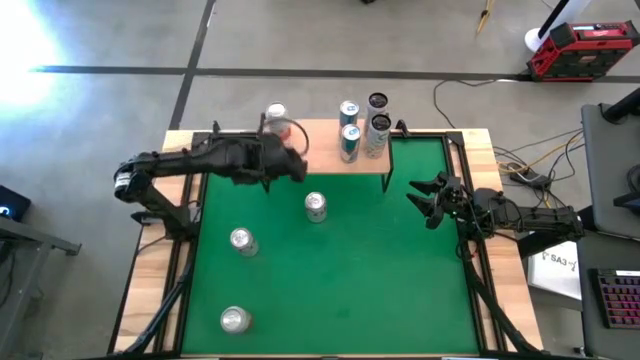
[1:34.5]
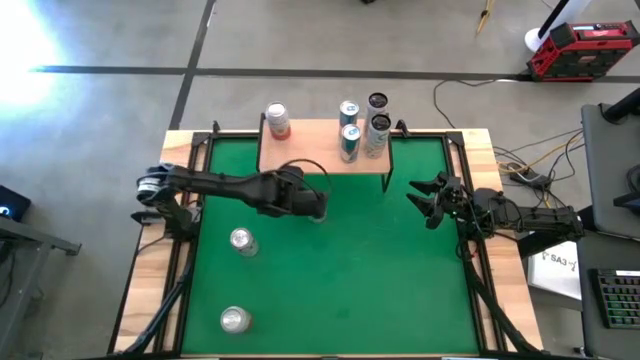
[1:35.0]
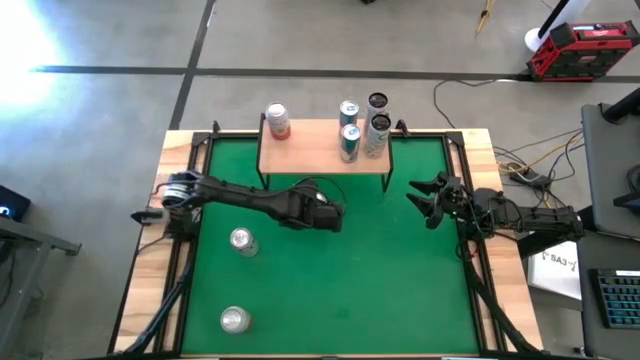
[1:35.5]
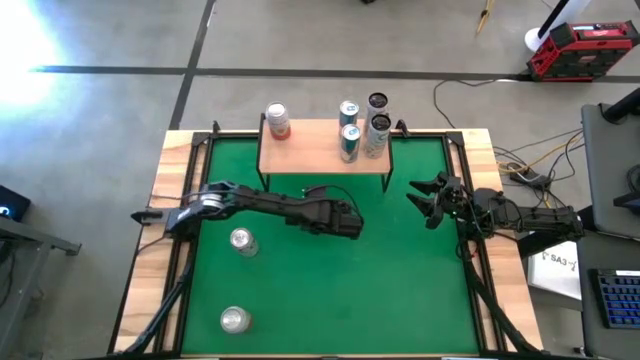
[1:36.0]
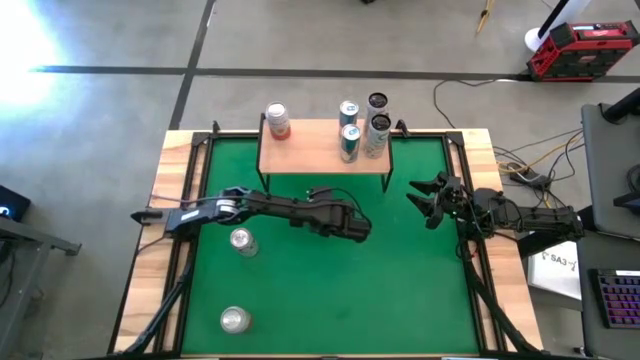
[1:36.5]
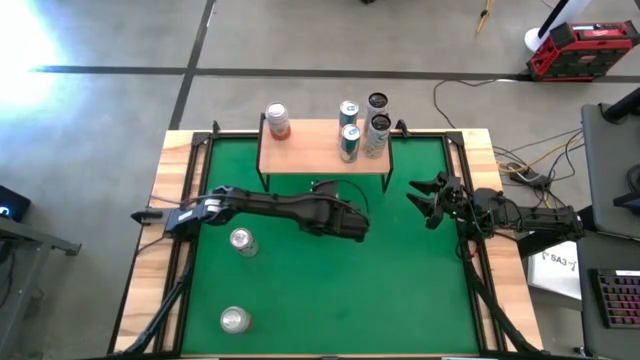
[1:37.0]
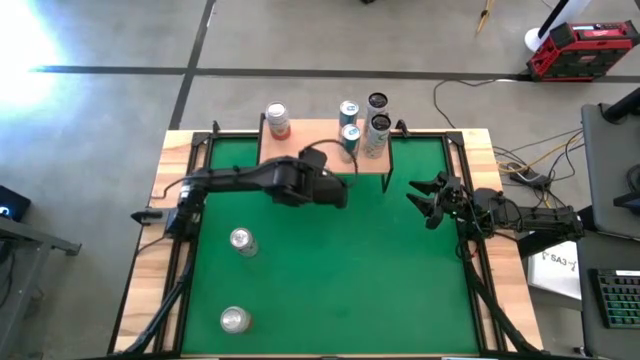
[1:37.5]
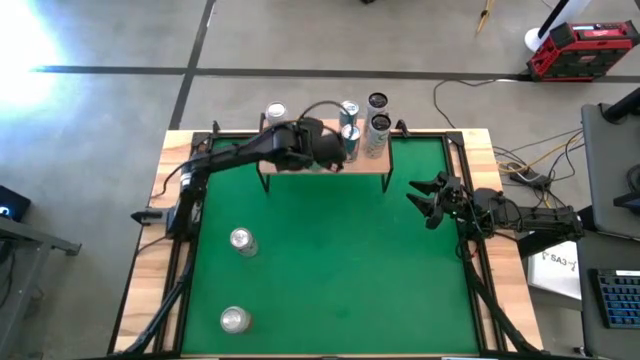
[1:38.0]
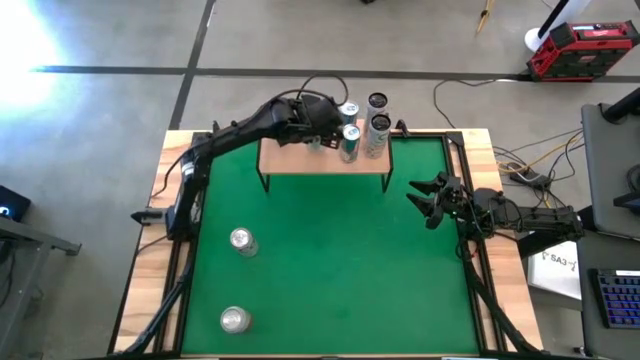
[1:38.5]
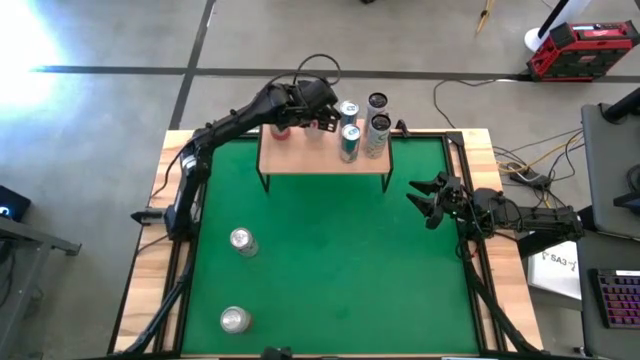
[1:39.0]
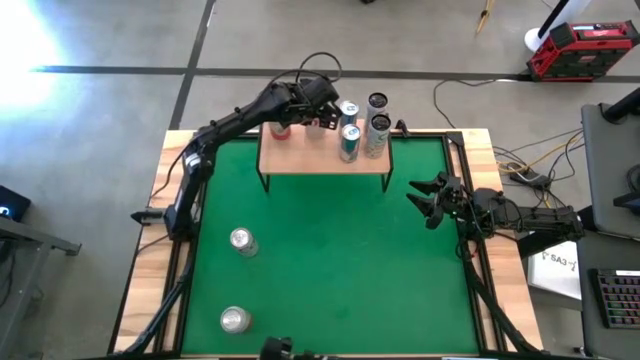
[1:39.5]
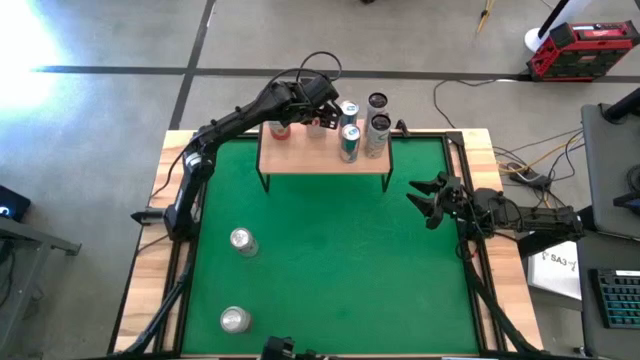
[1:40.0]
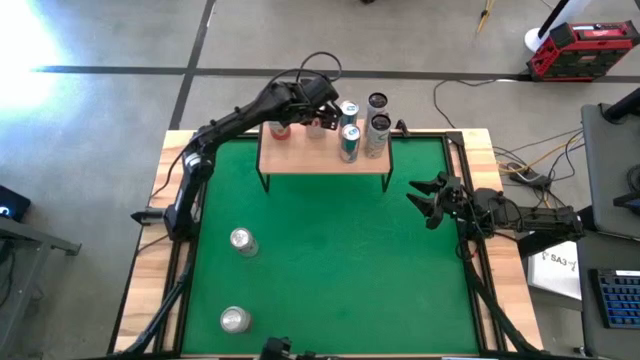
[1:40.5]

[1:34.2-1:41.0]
Task: Place canned beverage on shelf
Put the right red-silver soda can on the shelf

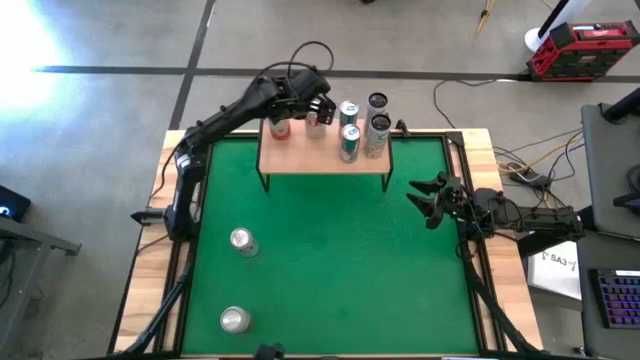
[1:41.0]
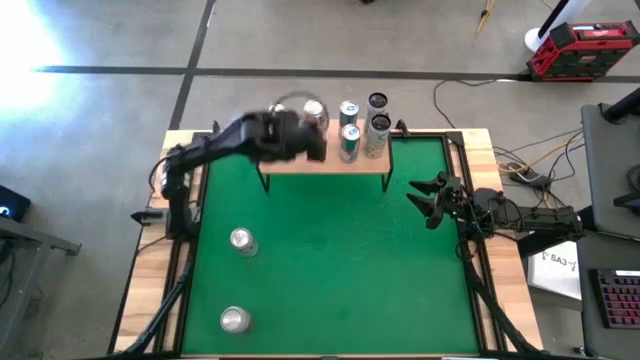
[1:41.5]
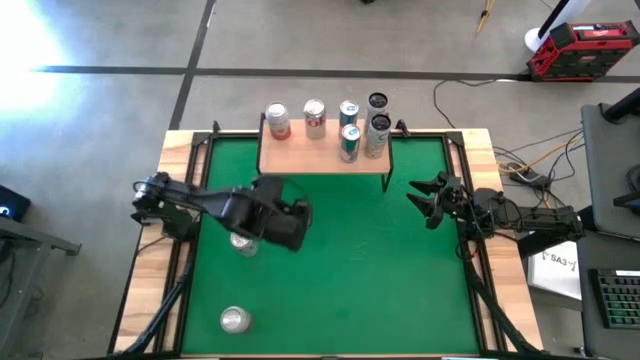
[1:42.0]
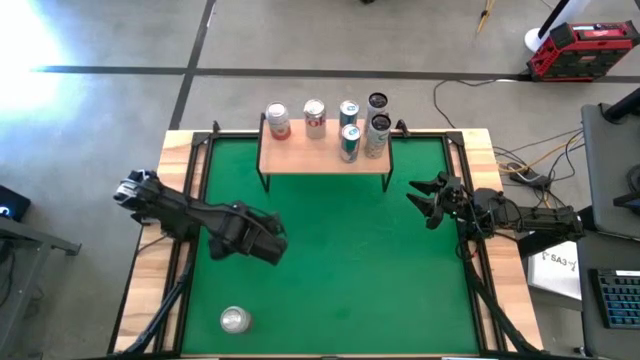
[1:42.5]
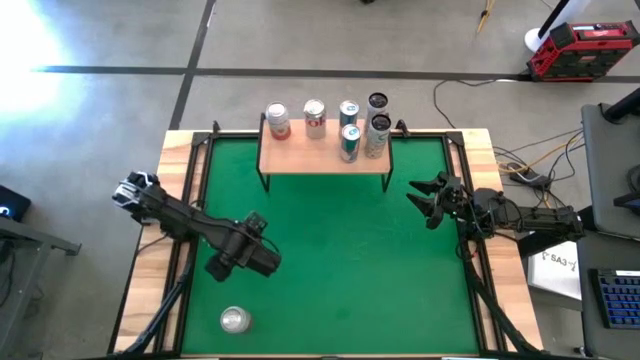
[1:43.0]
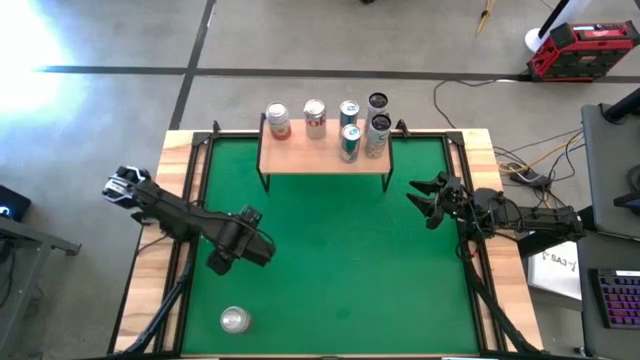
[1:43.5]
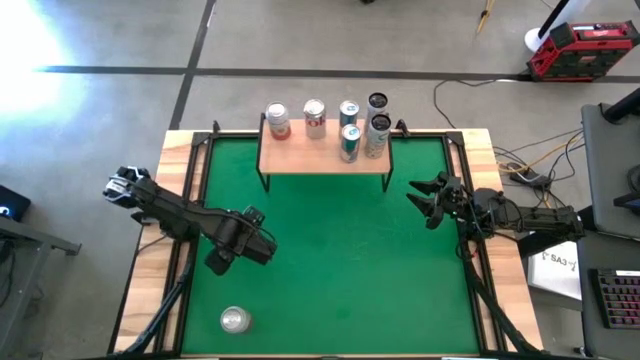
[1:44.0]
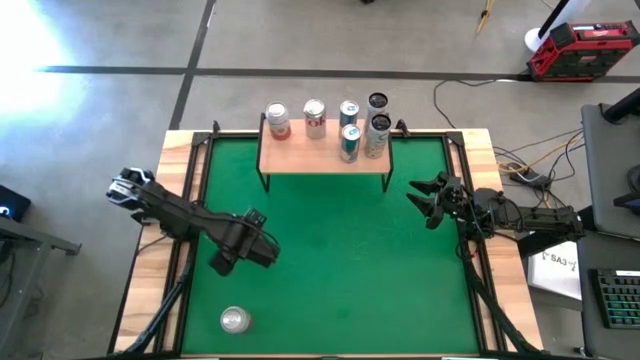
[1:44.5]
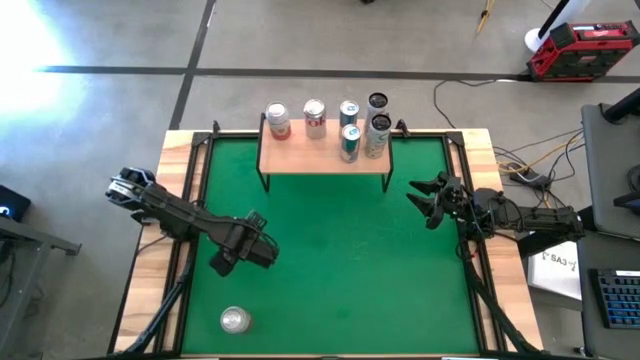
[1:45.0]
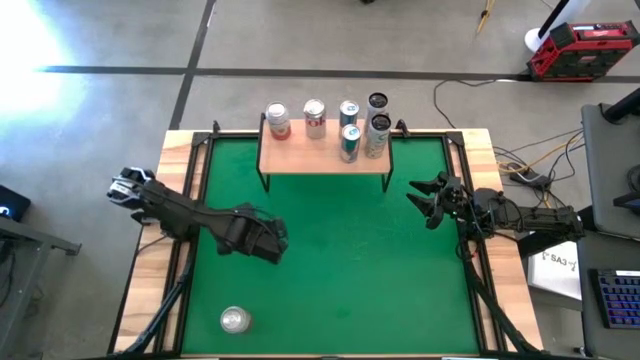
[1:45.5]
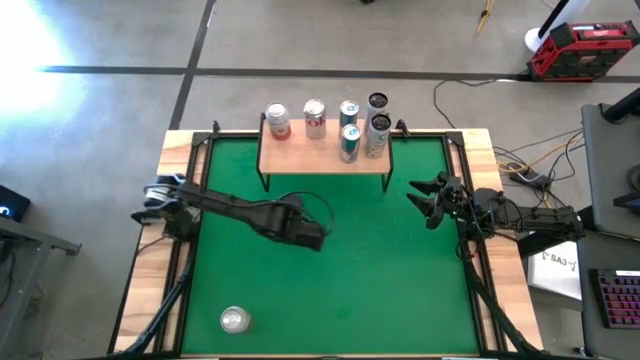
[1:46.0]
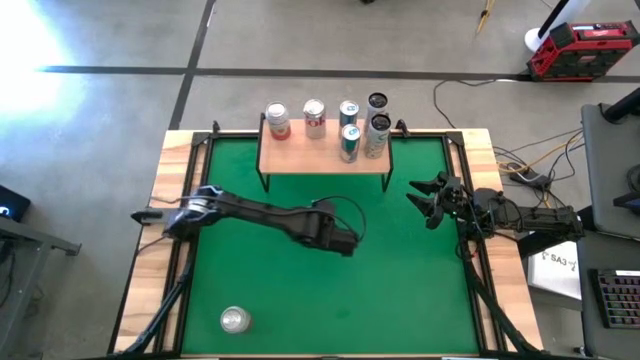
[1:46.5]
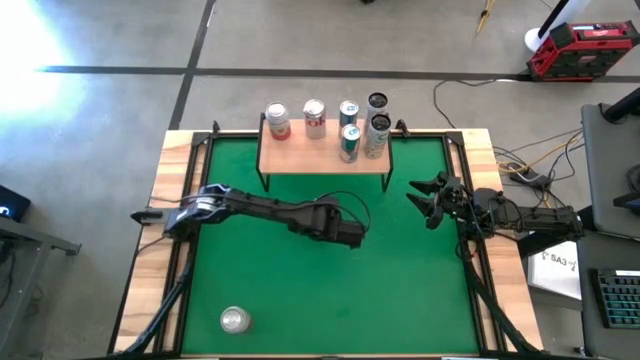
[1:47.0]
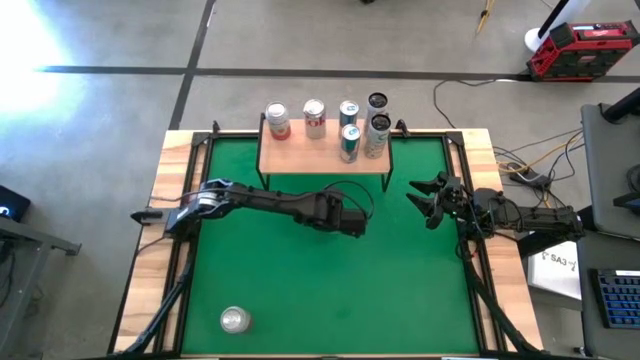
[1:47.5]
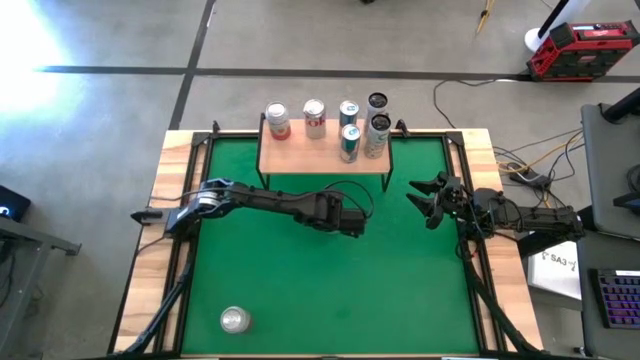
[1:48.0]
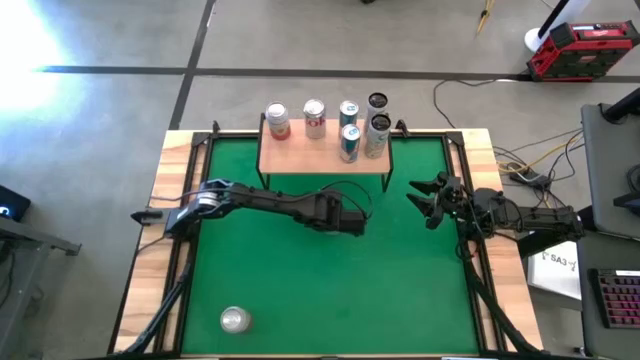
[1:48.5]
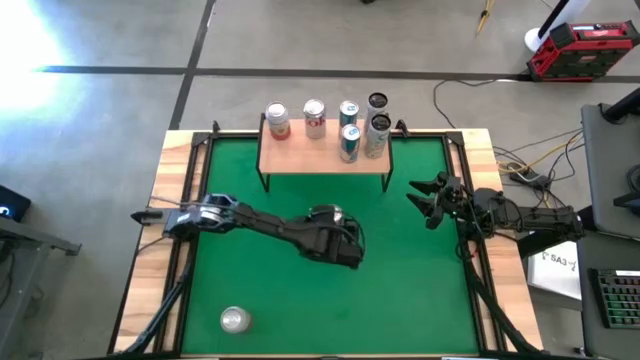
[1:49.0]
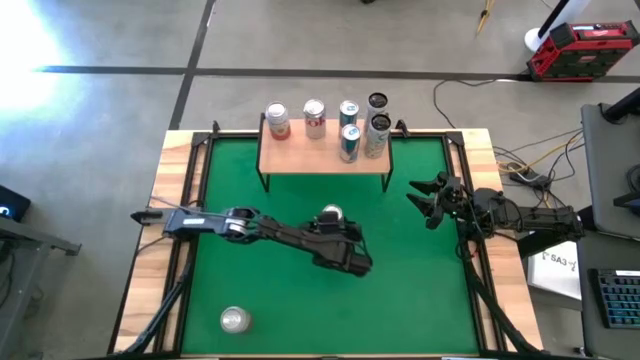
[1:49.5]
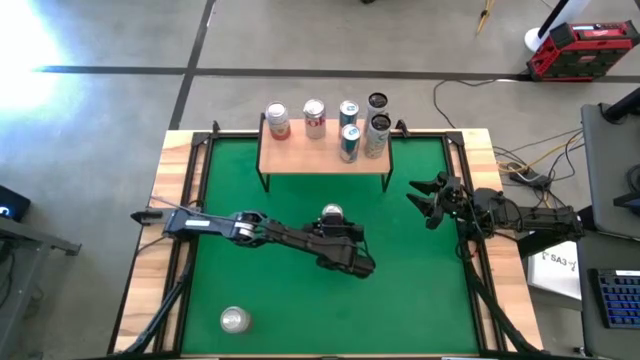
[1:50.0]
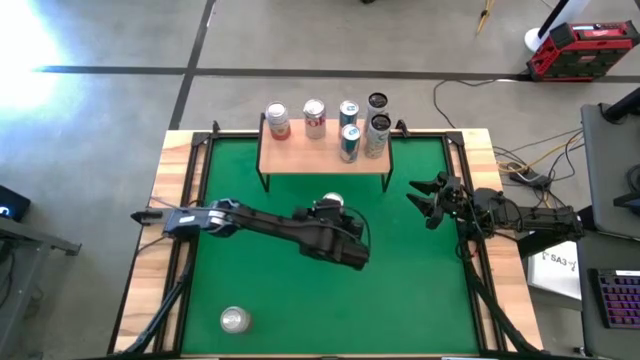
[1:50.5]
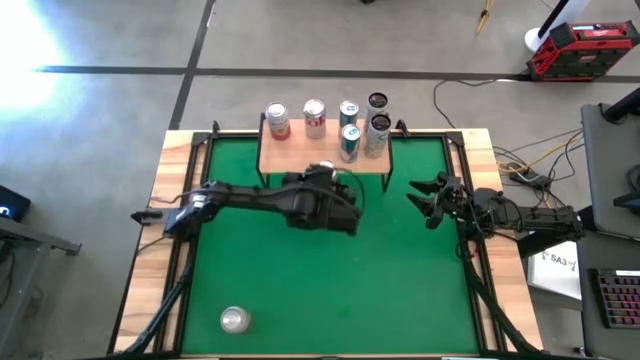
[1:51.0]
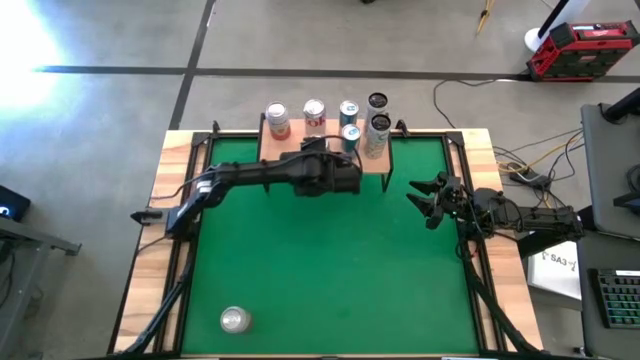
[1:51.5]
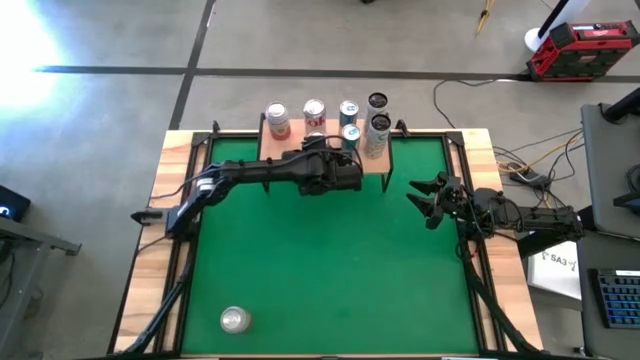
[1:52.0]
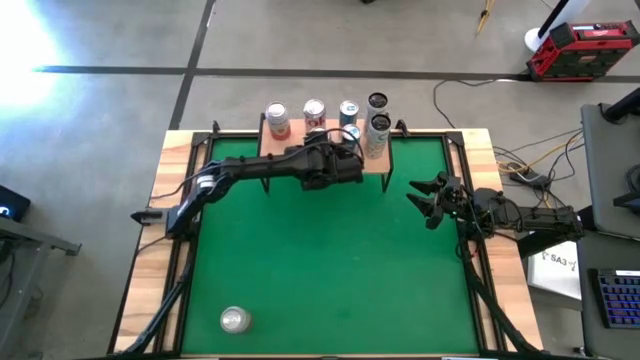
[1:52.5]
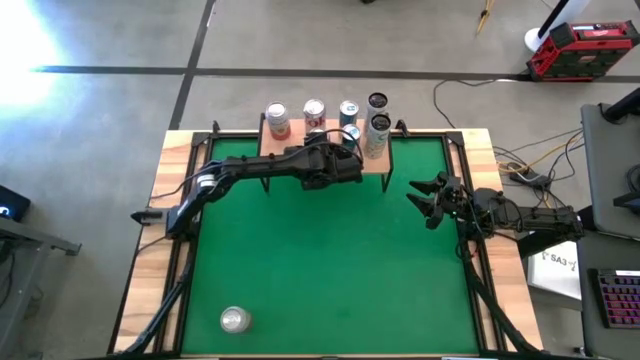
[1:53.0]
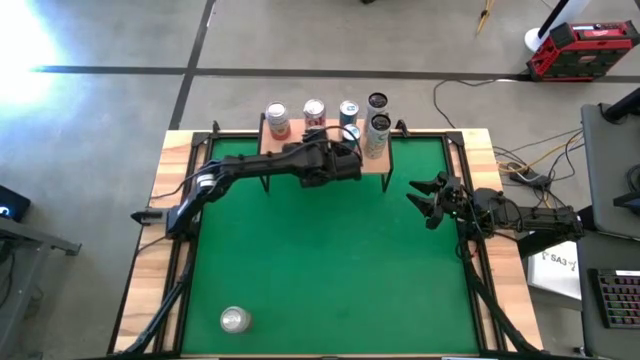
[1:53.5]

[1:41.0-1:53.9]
Put the red-silver soda can on the shelf aligned with the other red-silver soda can

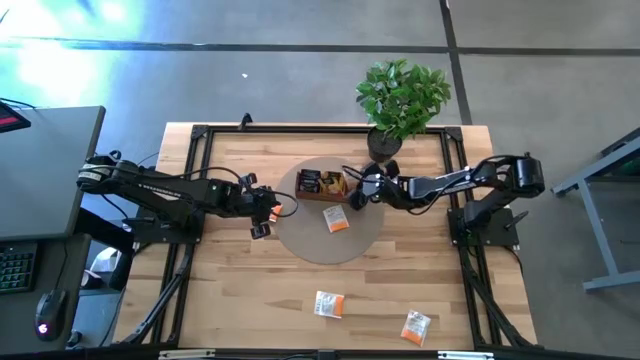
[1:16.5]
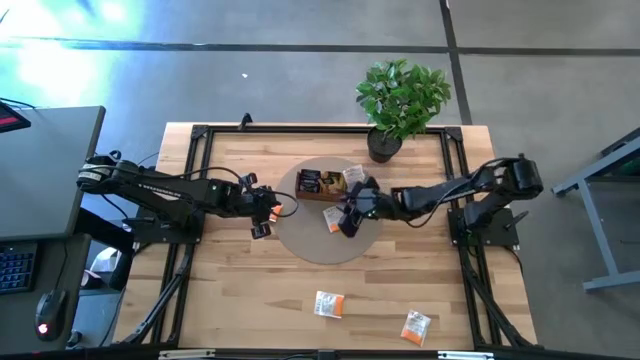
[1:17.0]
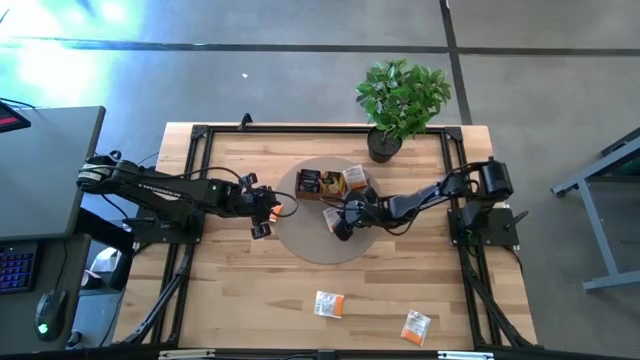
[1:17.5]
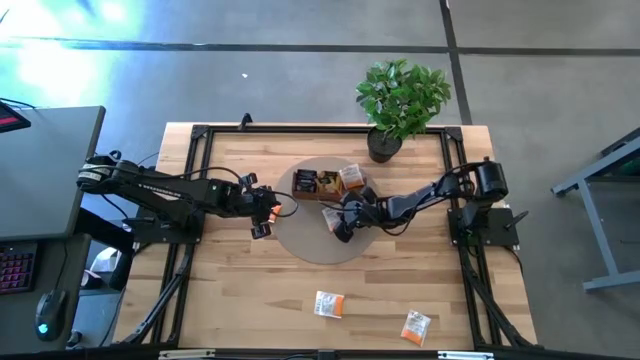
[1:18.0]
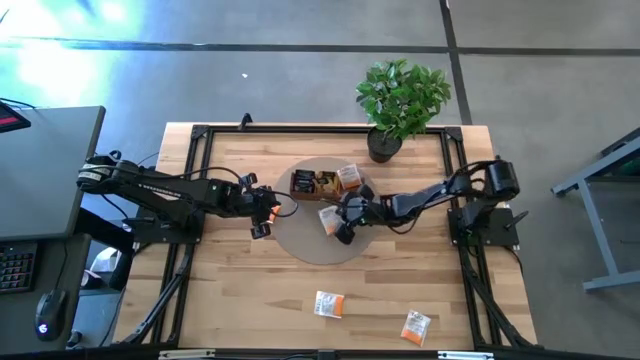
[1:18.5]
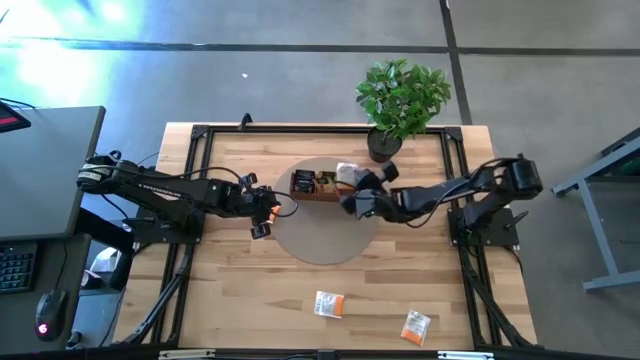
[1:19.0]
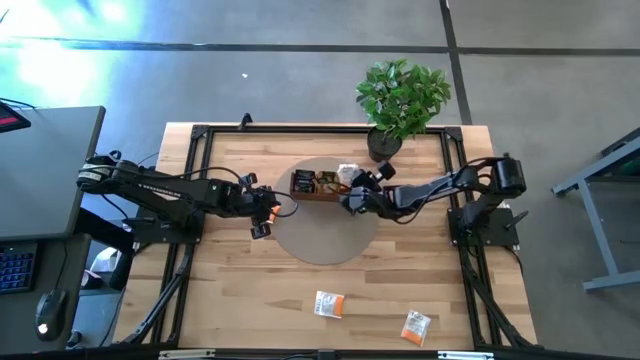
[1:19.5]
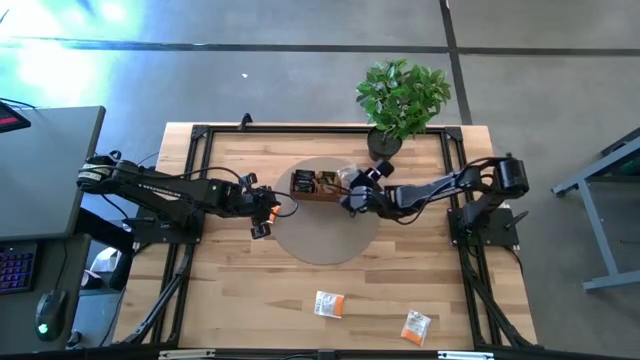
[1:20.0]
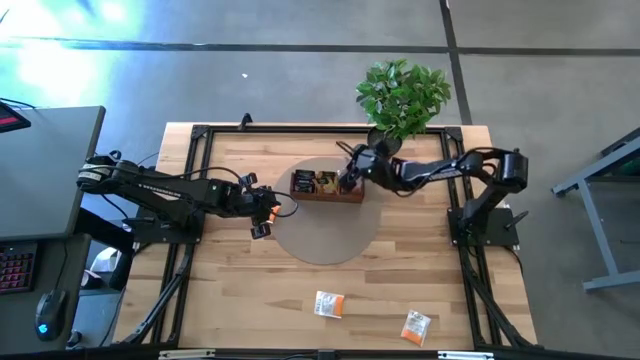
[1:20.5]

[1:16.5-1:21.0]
Task: Pick & Place Tea
Put the white tea bag into the right side area of the wooden organizer
